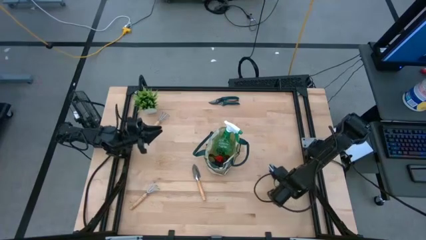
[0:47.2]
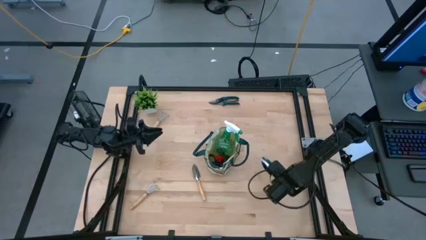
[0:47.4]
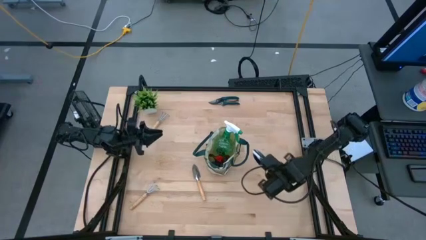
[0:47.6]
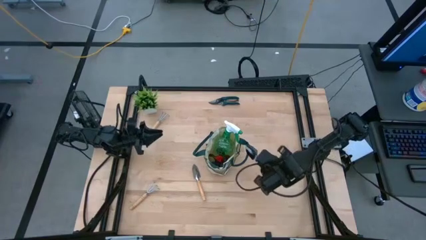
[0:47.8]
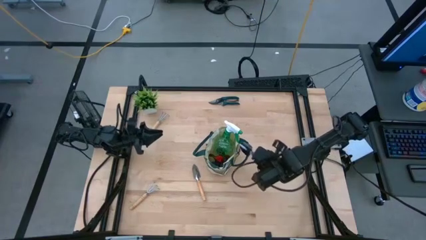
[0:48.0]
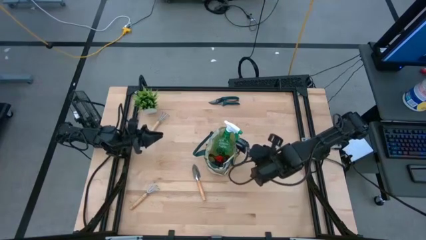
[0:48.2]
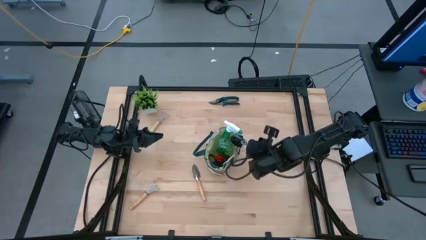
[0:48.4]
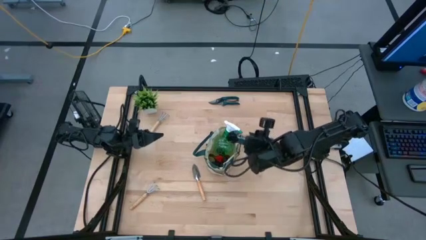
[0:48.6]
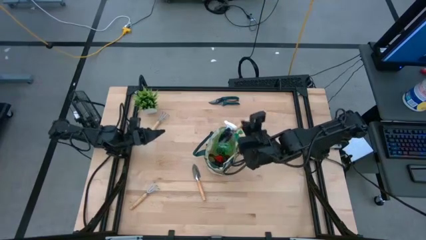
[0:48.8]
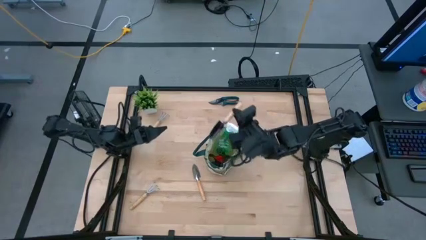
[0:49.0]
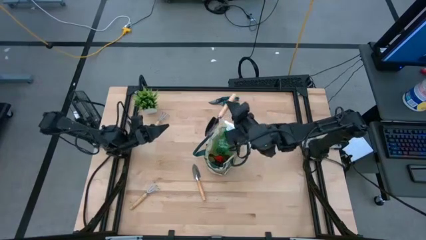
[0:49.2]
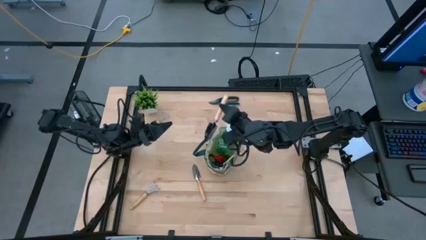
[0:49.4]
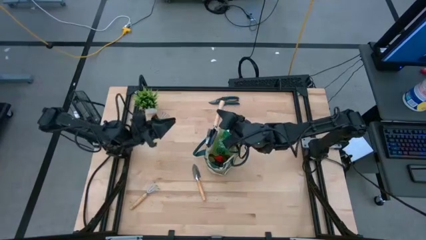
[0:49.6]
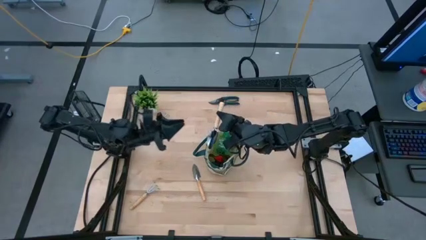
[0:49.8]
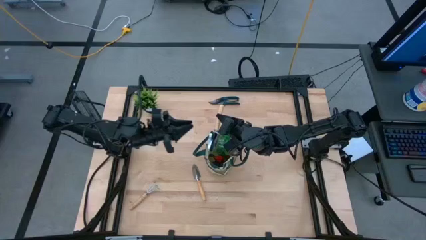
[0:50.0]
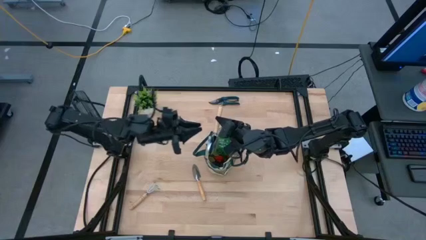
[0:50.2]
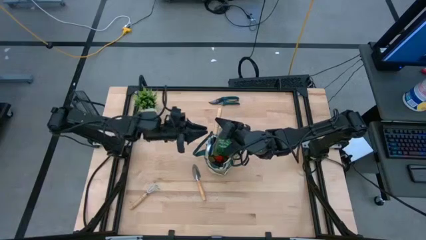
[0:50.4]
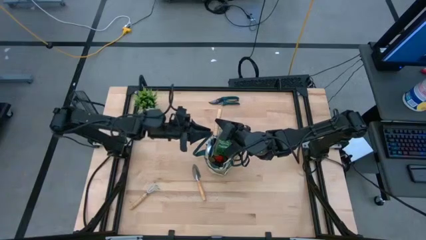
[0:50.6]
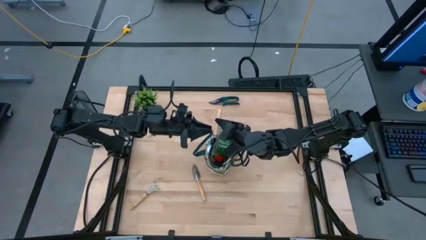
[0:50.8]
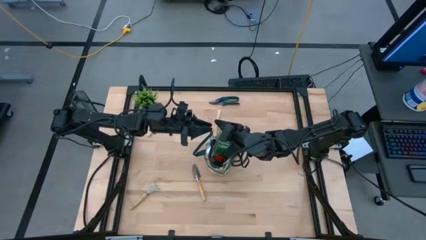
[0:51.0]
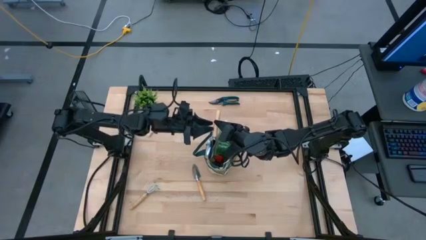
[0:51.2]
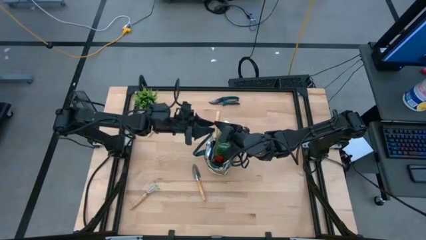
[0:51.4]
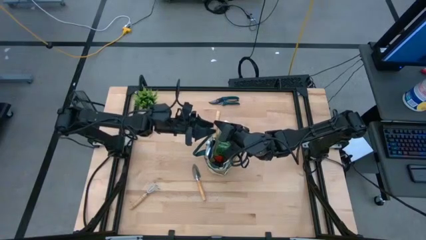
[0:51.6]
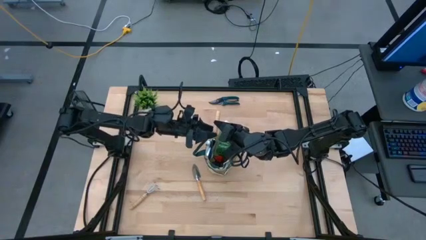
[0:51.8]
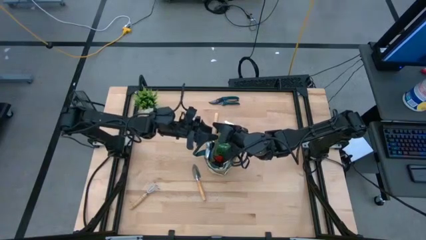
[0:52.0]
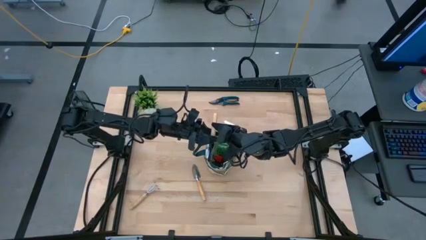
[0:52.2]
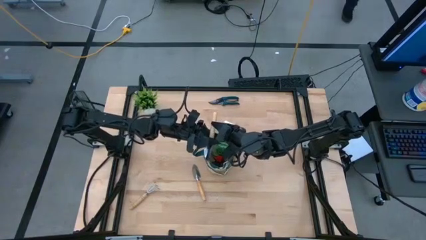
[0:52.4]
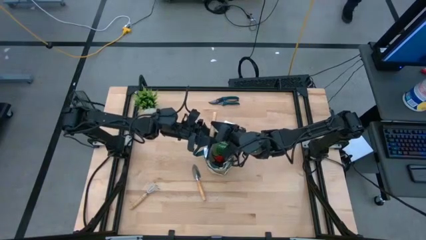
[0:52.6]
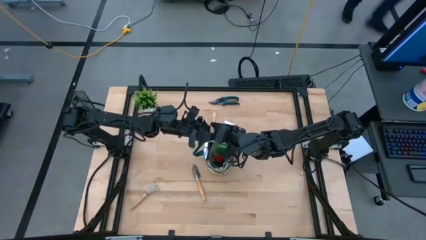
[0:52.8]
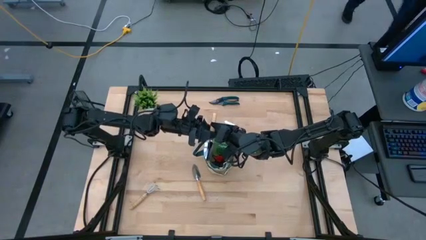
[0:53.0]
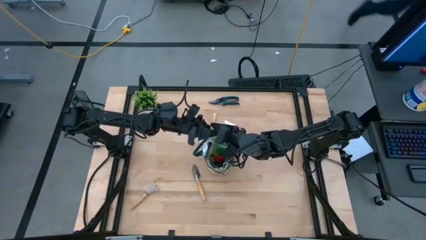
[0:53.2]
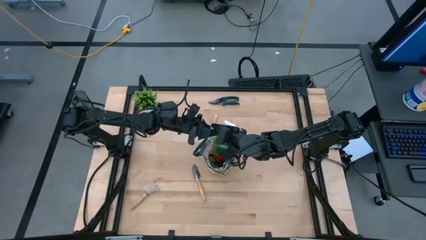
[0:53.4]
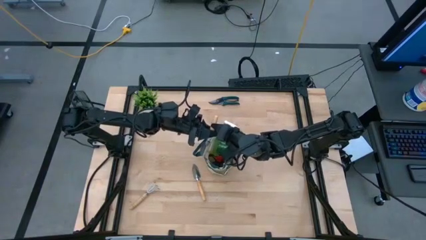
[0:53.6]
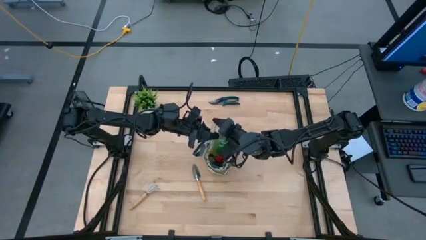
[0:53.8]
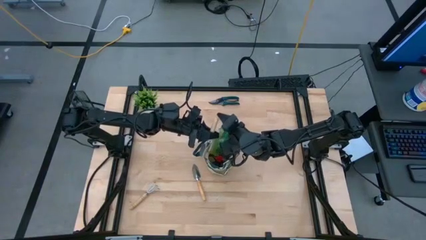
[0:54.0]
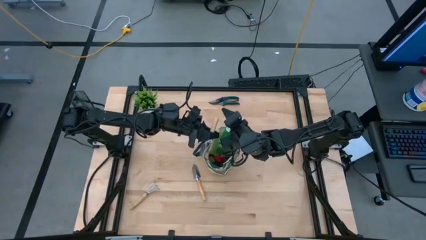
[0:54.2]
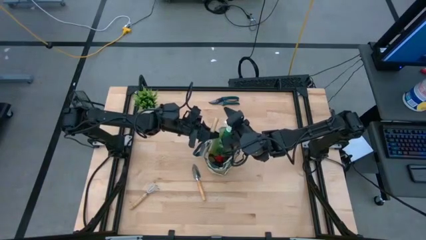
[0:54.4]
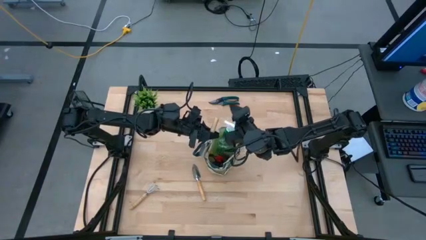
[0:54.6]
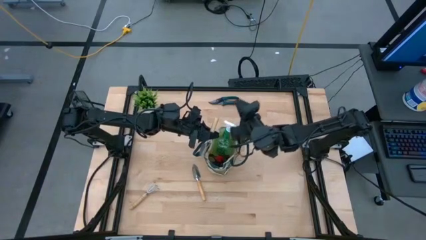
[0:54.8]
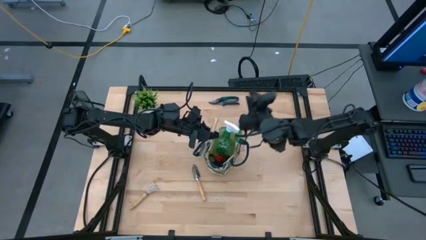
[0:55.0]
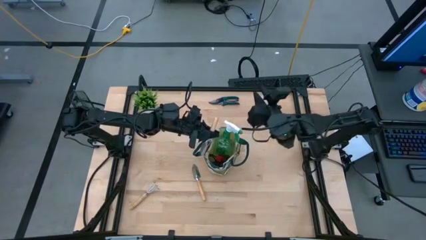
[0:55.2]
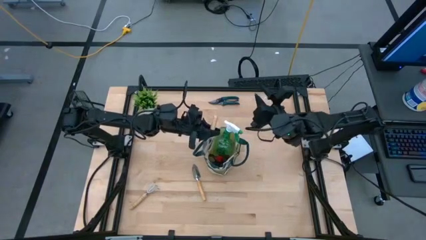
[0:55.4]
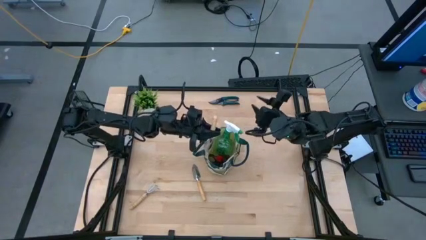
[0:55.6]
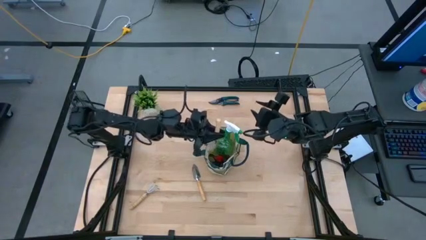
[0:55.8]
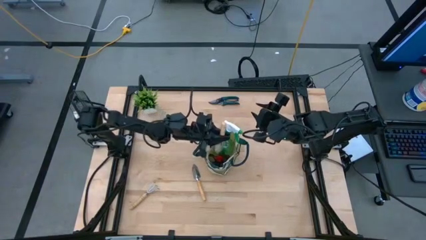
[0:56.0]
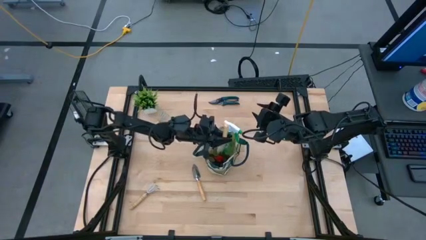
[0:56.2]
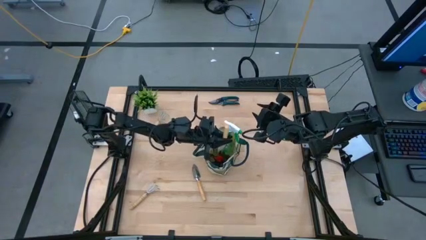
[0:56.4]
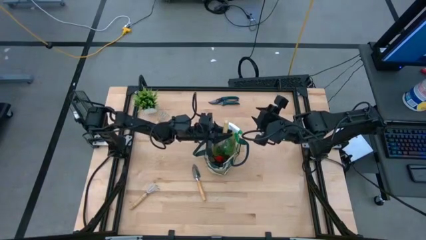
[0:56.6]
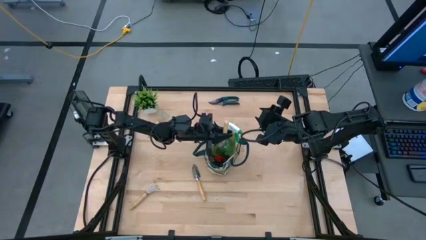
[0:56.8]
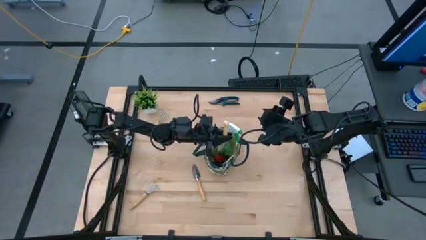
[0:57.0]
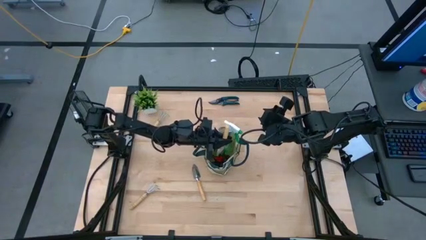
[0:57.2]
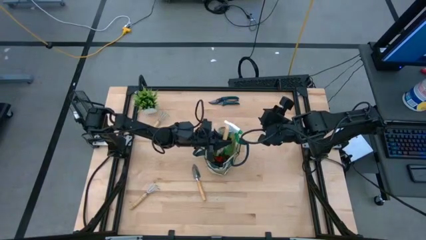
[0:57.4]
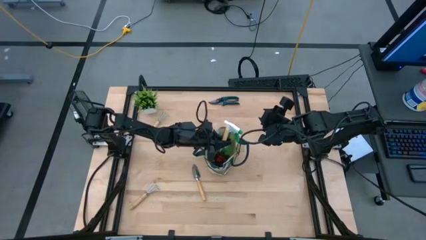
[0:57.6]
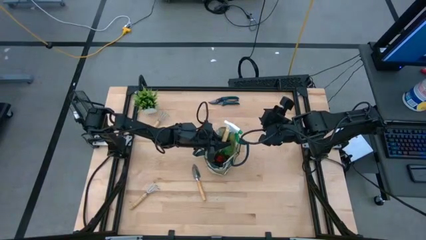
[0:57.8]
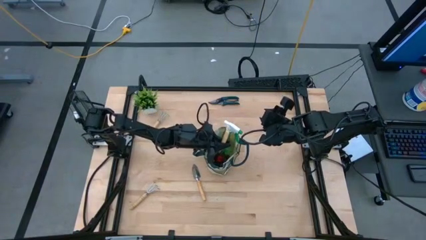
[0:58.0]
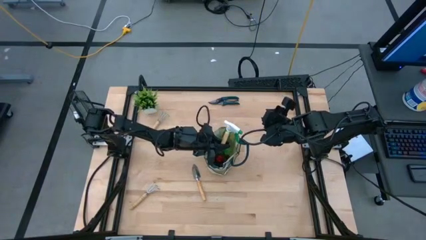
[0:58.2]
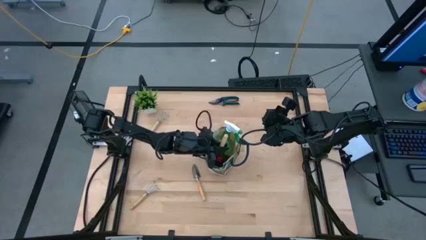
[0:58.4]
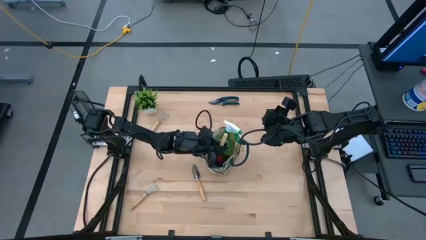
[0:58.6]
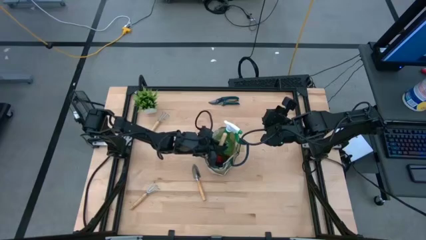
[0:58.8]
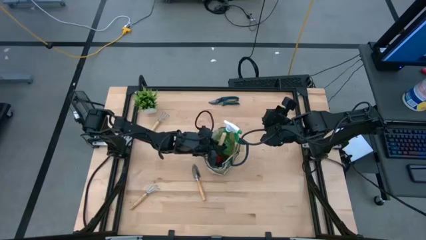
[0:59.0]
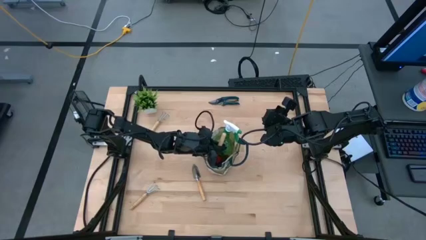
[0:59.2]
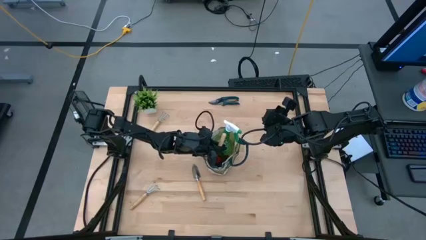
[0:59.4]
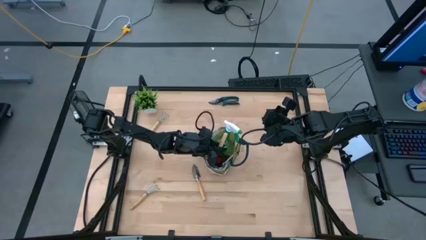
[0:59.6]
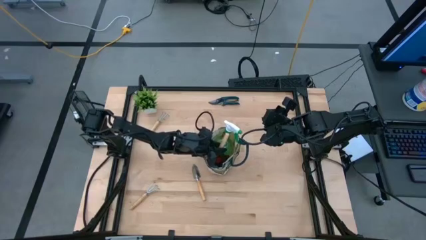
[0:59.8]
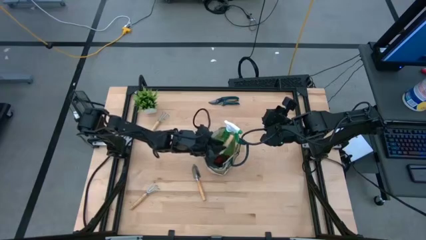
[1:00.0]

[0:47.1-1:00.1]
Task: Pick & Place Garden tools in Gardening bag
Put the right brown trowel into the gardening bag

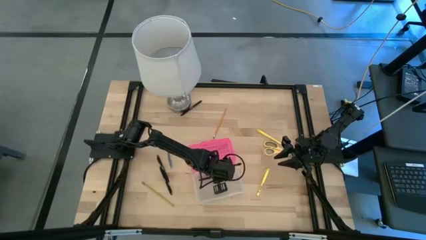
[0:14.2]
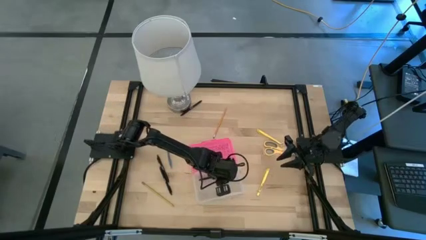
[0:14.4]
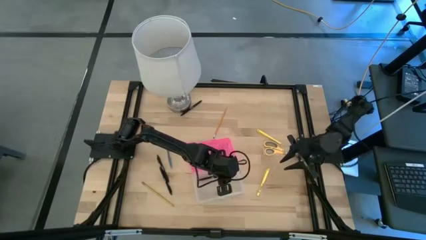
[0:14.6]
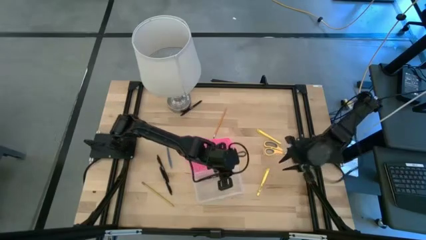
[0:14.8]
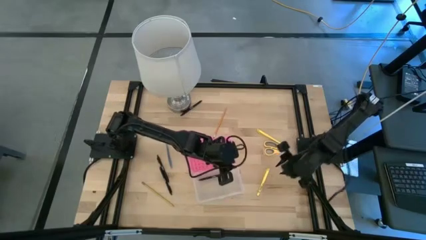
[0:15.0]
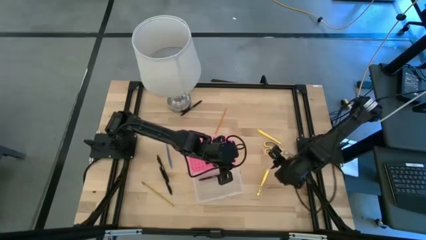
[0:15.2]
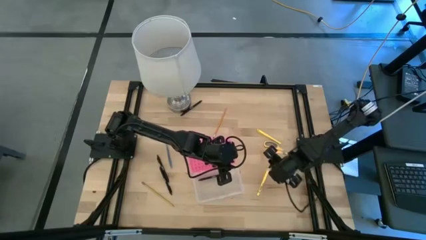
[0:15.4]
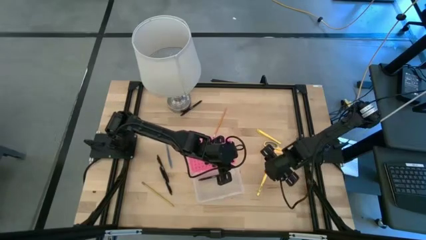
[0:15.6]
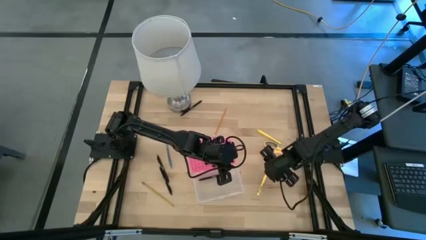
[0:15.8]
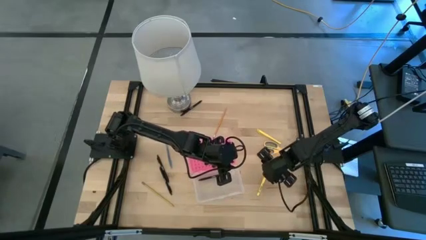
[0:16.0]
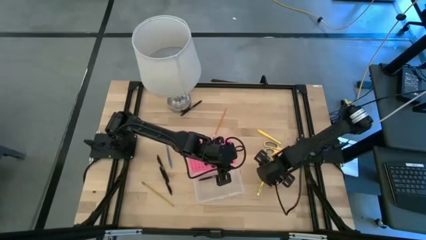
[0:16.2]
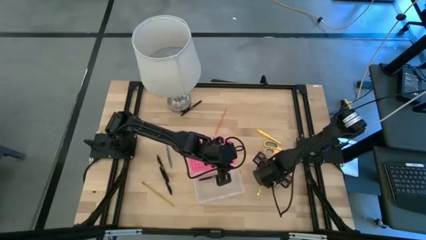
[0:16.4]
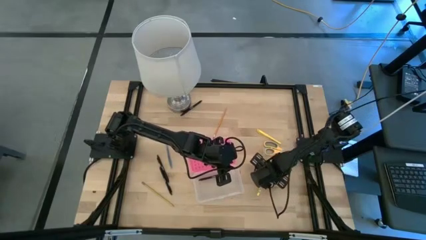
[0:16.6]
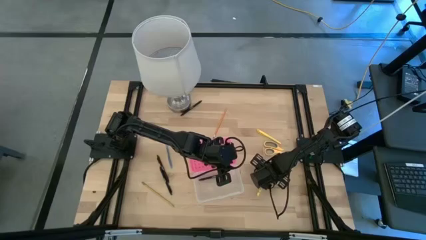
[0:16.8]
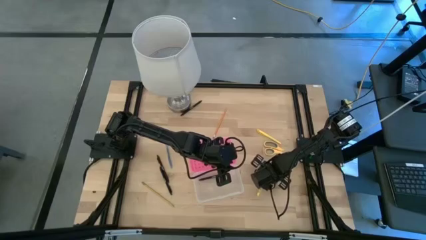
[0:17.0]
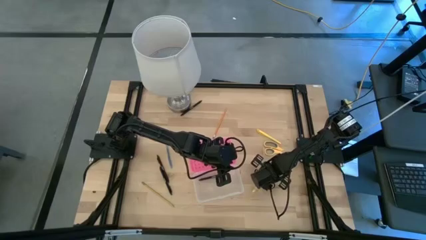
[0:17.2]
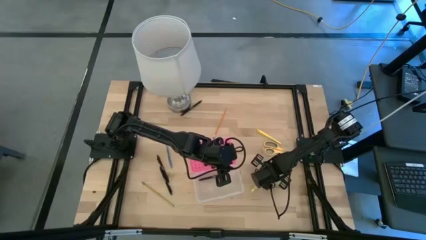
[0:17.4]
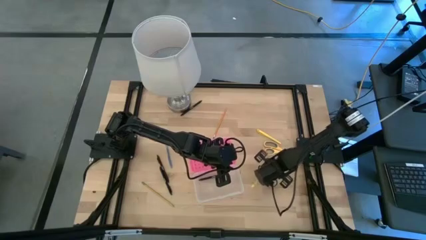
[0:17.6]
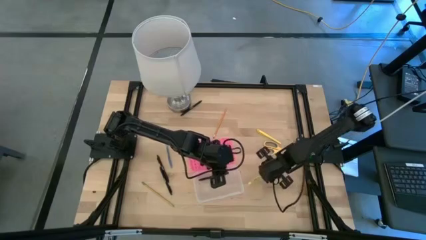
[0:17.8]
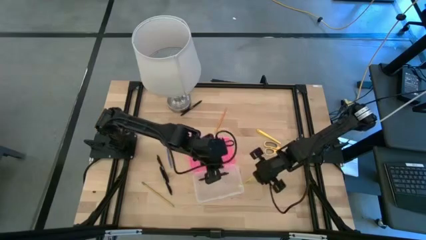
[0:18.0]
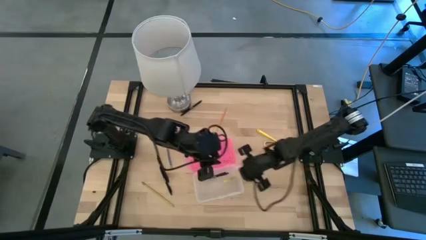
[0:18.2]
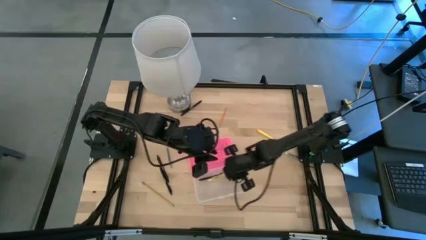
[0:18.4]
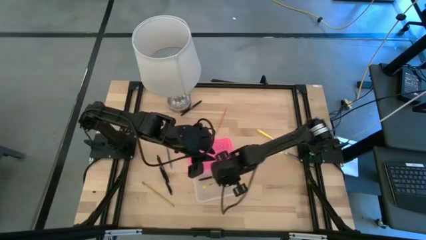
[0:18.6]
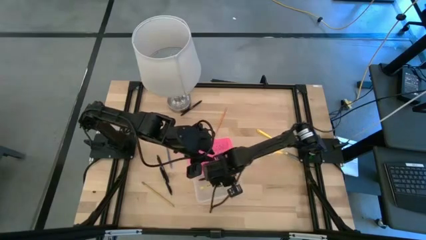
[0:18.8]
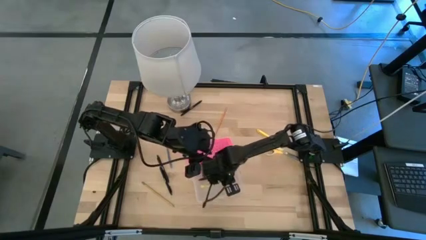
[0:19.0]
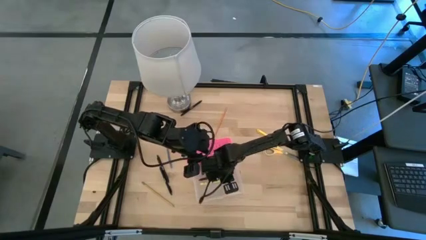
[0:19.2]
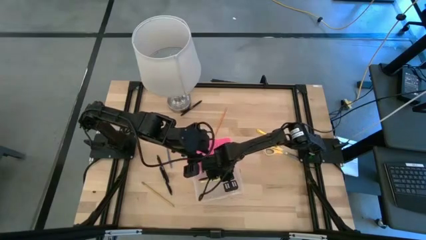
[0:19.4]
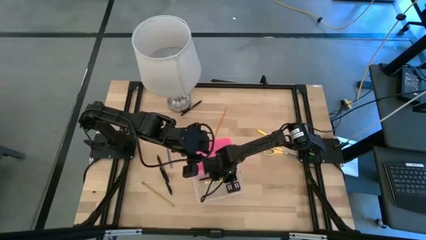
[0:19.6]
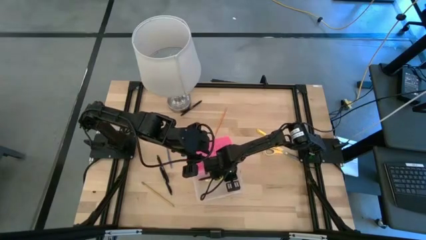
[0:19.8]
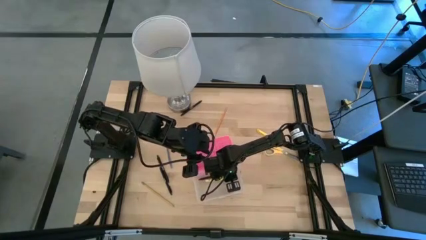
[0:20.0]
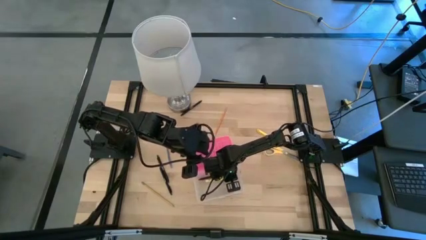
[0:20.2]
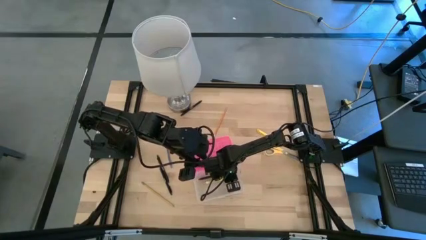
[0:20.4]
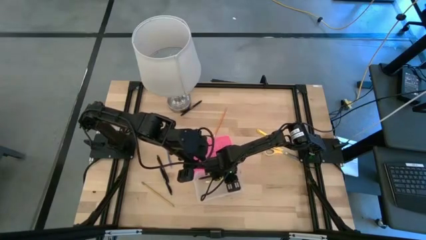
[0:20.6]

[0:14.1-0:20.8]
Task: Pick & place school supplies into a supply box
Put the yellow pen into the transparent supply box
